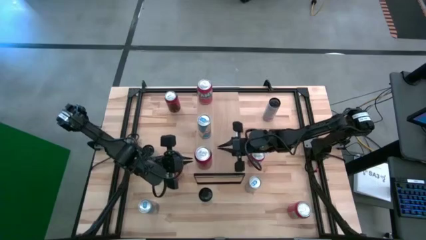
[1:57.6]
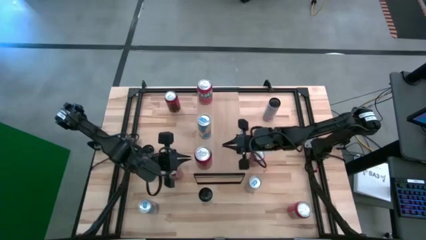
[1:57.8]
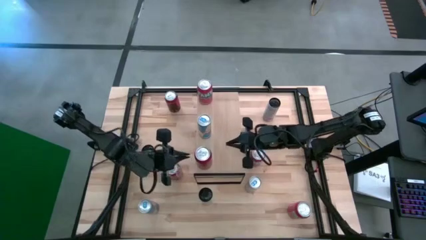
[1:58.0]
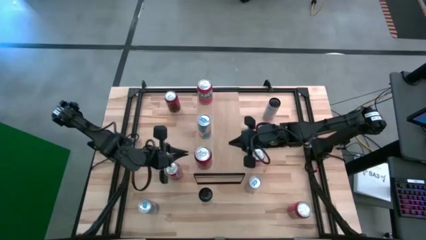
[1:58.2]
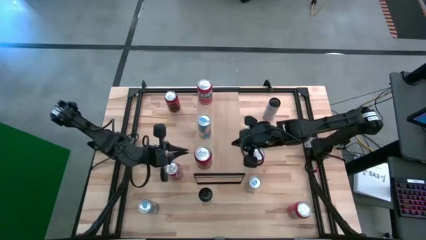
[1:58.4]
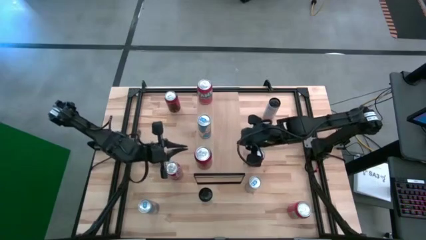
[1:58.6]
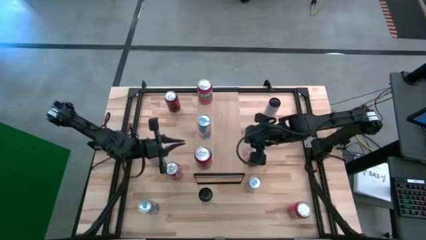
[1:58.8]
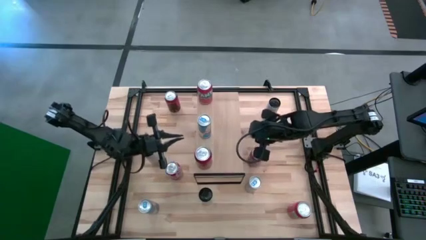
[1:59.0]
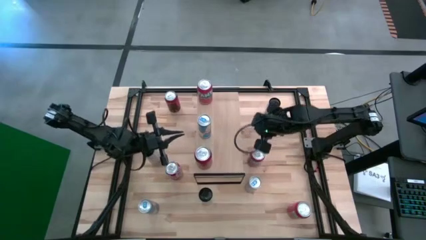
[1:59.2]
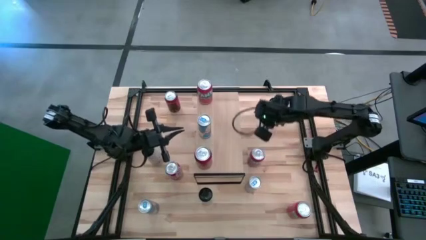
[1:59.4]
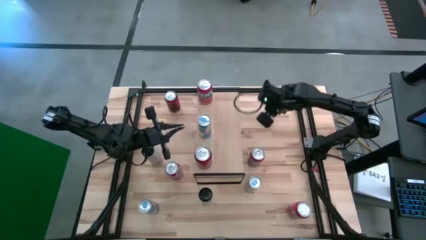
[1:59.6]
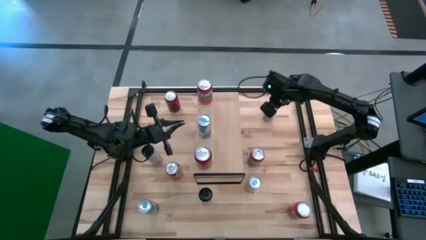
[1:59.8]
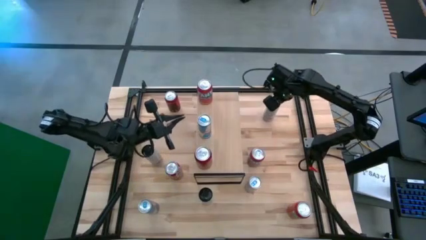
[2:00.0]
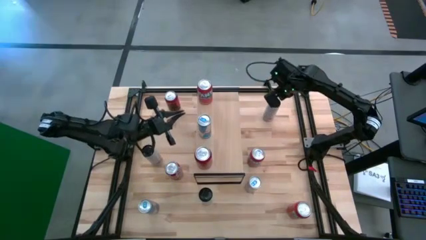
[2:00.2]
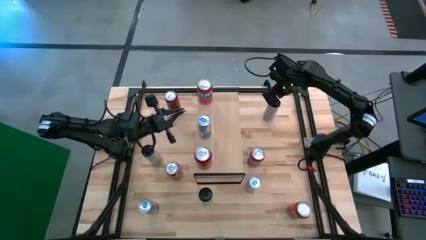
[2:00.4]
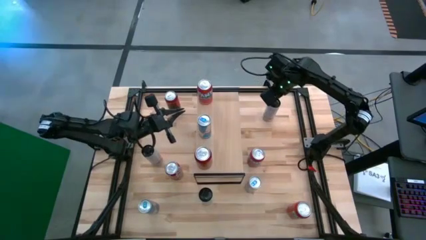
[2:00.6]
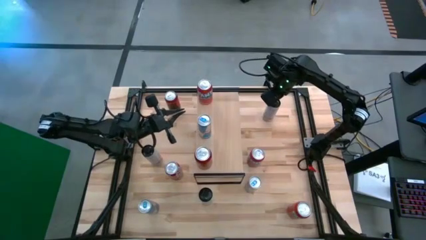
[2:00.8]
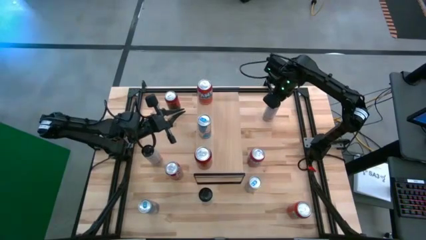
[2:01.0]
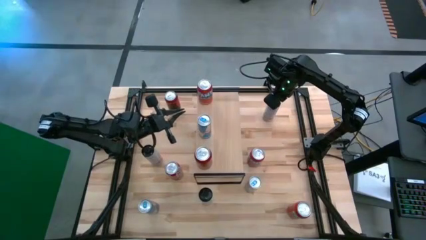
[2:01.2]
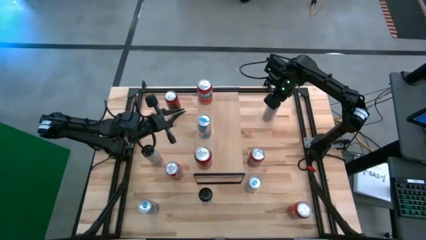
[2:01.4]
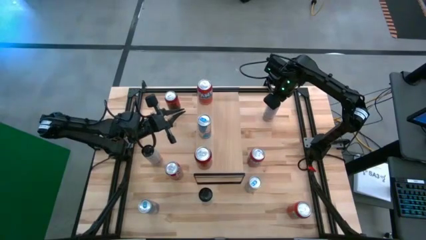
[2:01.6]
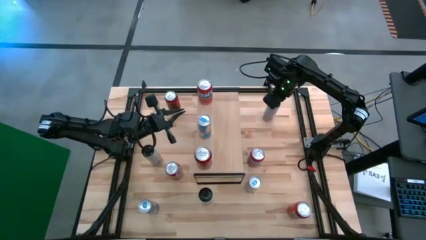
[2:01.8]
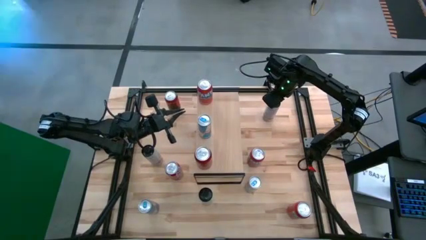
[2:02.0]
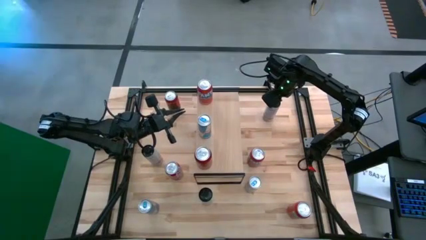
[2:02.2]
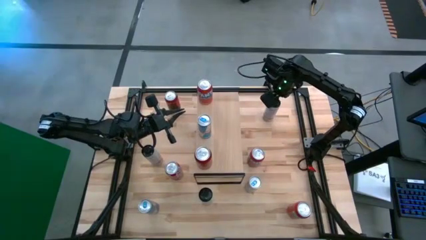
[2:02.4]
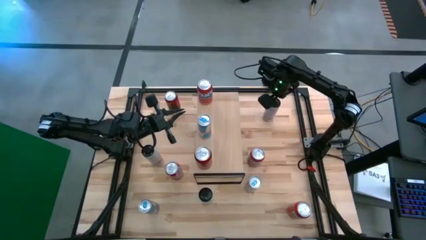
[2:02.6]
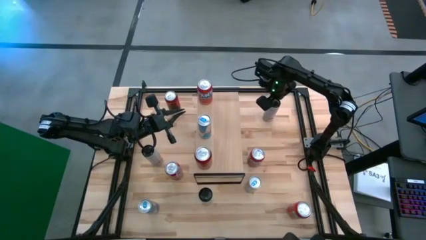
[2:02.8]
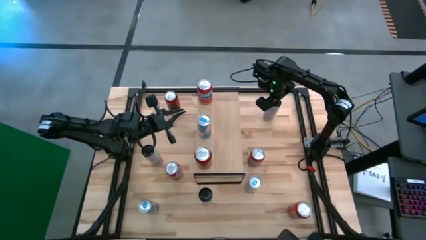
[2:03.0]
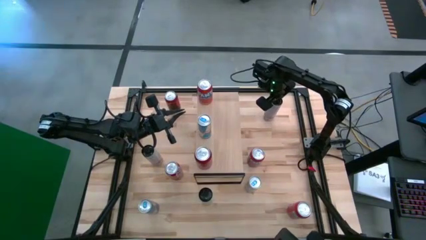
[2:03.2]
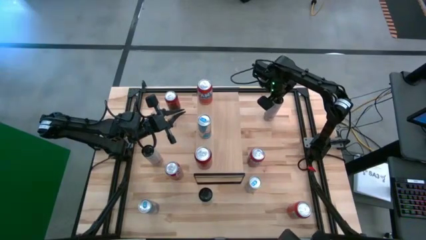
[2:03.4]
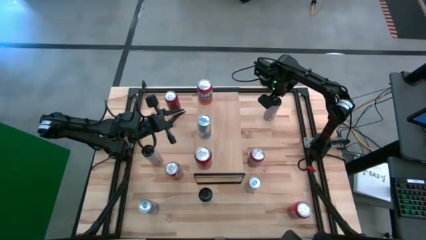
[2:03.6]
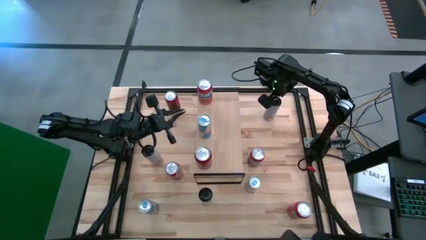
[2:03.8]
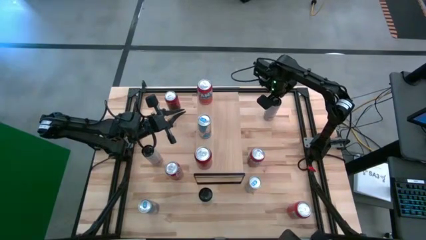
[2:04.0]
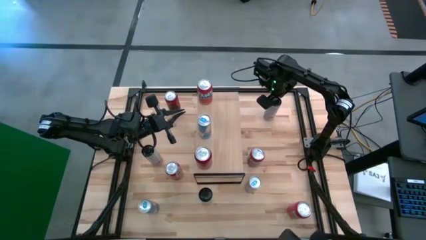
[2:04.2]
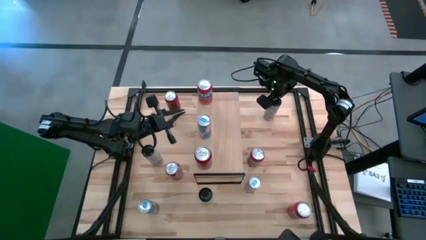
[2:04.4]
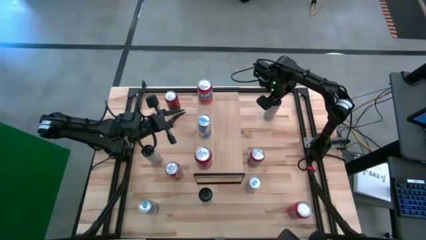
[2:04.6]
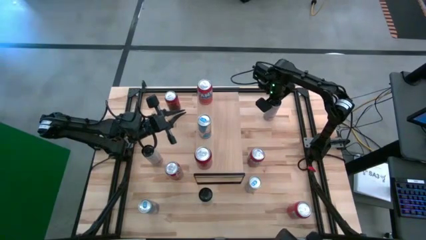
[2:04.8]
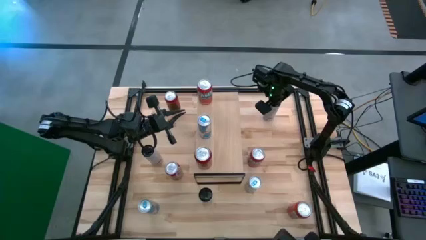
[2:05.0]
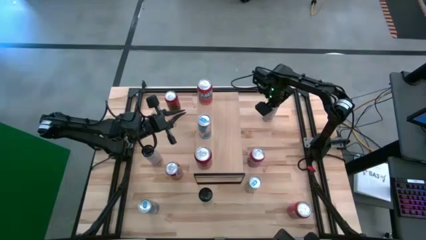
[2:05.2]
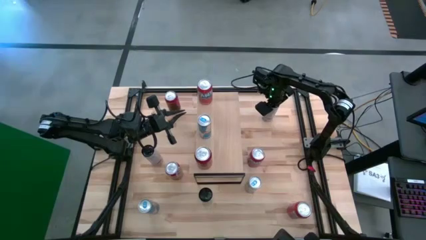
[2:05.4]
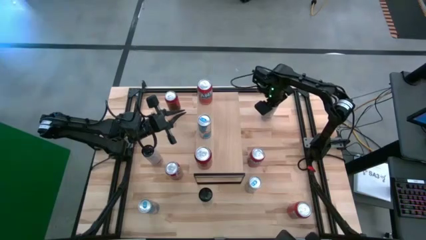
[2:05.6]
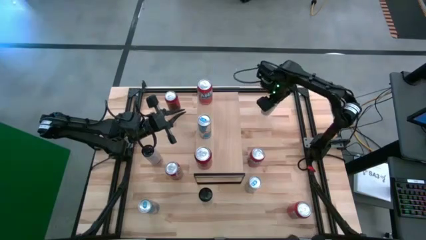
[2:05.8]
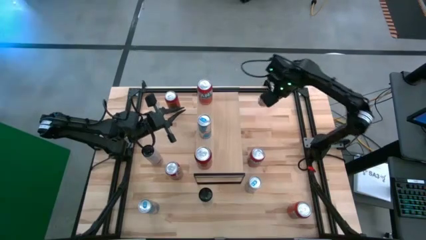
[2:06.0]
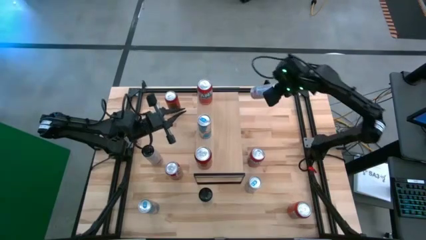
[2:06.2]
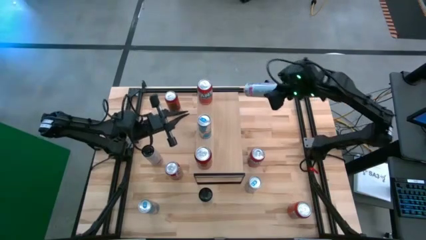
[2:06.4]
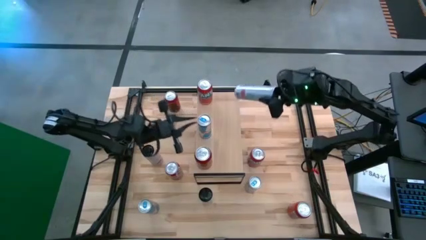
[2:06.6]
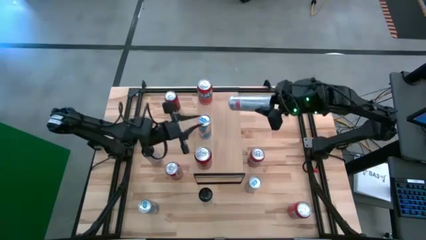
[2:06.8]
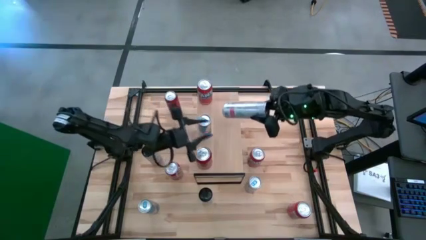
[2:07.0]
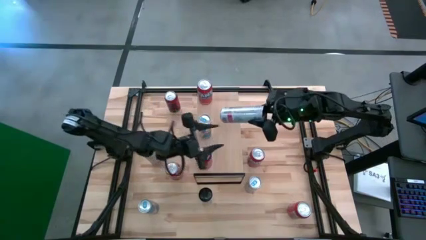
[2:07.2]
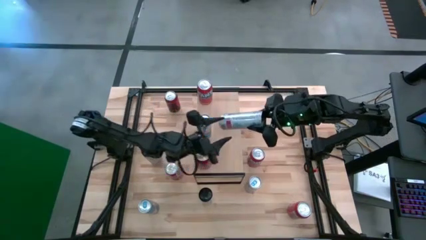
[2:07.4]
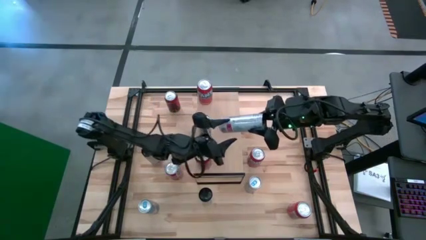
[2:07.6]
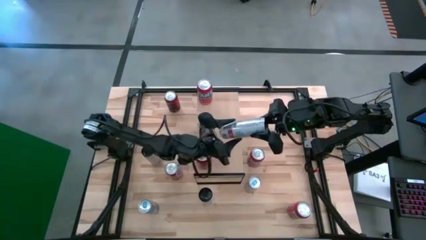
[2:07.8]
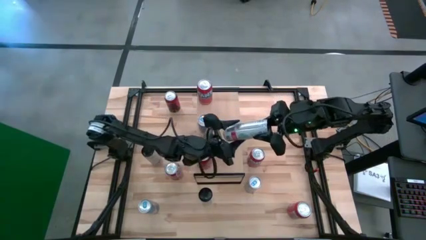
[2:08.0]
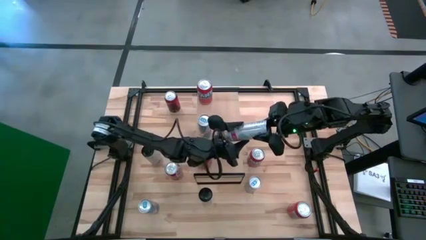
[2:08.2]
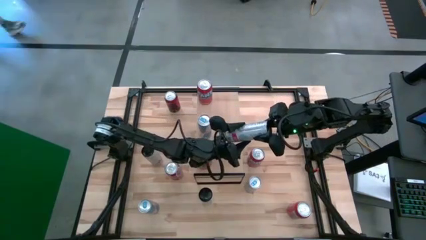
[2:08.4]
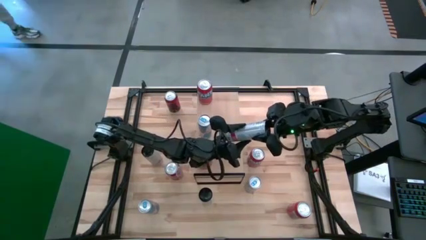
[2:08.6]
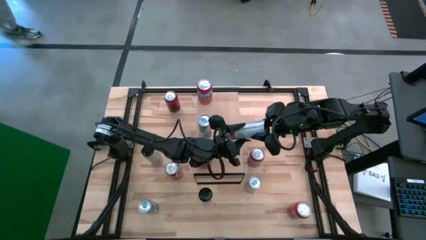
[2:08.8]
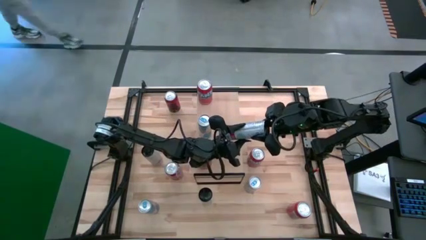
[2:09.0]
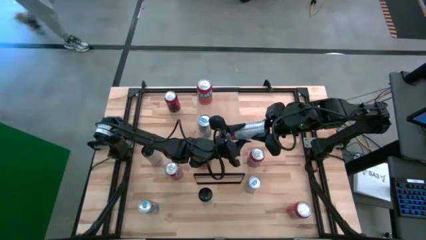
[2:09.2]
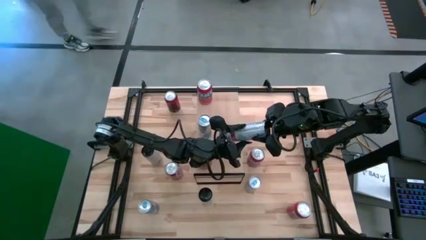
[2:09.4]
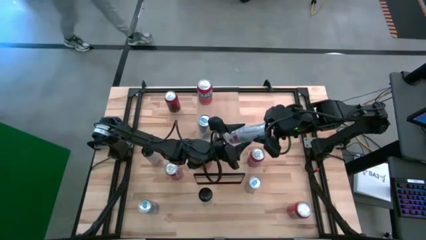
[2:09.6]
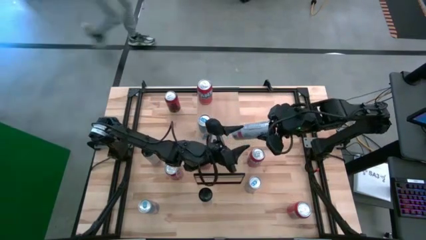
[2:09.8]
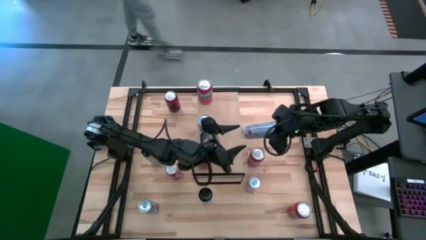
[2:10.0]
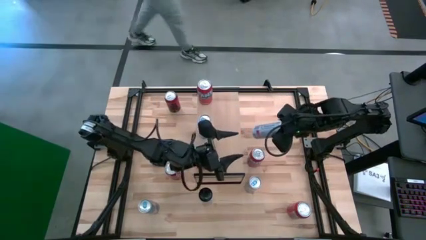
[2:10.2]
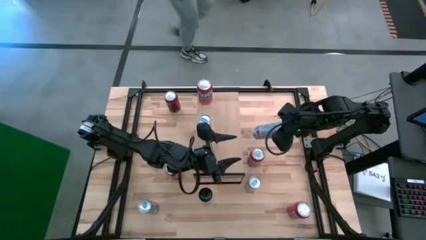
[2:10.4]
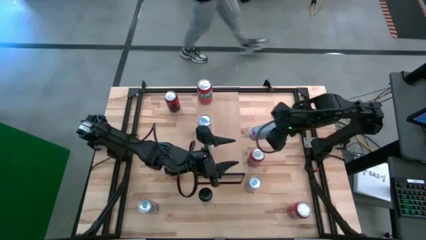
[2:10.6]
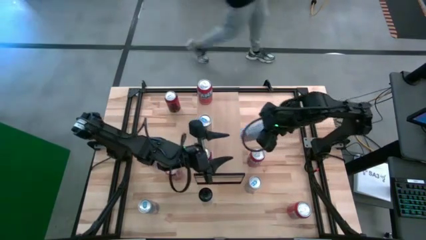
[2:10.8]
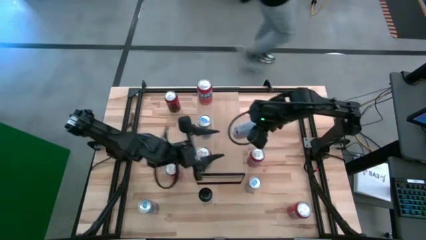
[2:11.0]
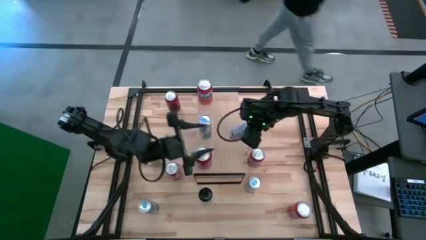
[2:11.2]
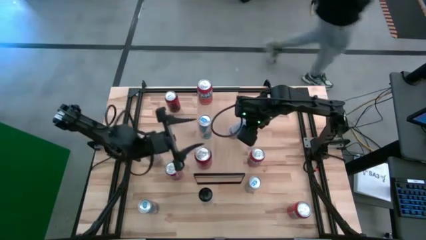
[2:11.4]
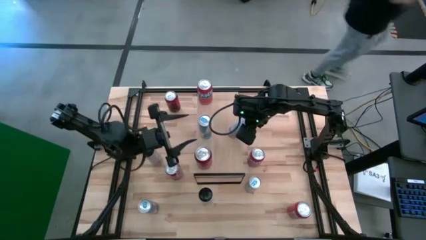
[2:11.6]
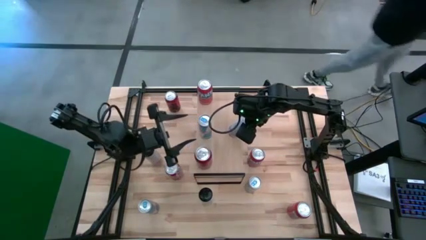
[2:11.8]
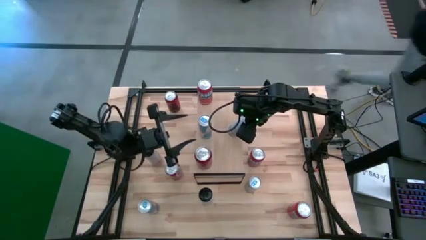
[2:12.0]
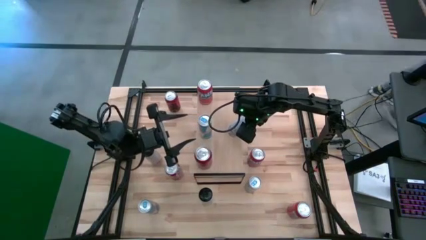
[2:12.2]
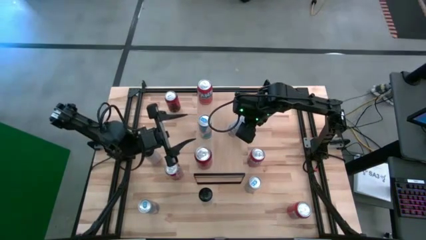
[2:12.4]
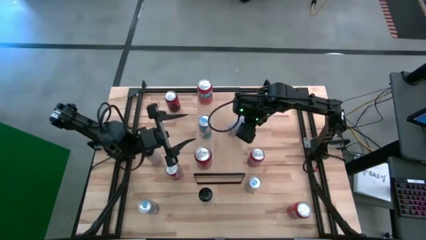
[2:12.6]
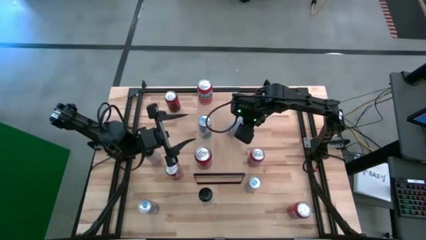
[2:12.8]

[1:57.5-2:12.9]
Task: Place canned beverage on shelf
Put the white and pink soda can on the top right shelf
